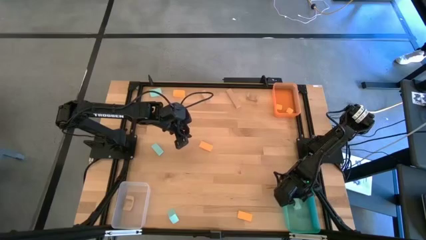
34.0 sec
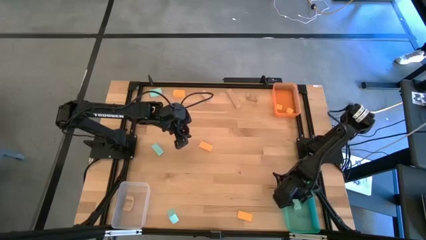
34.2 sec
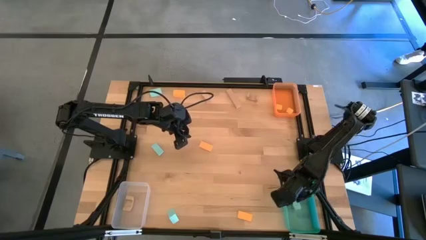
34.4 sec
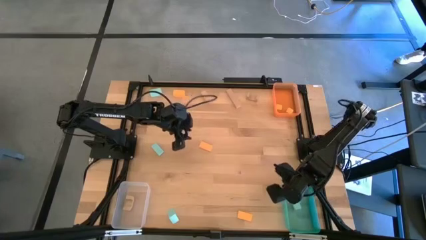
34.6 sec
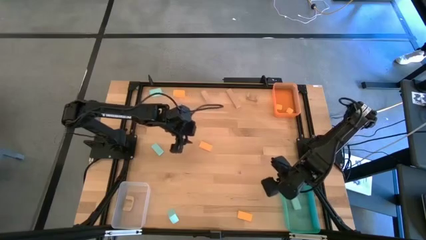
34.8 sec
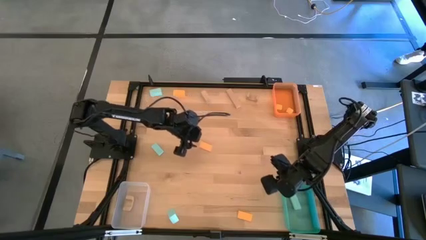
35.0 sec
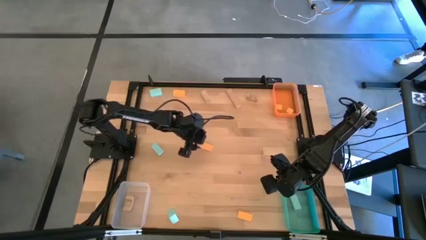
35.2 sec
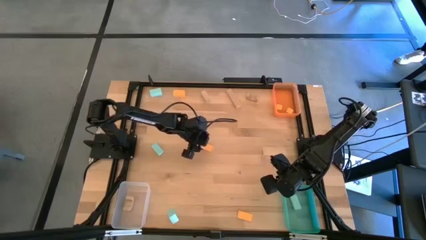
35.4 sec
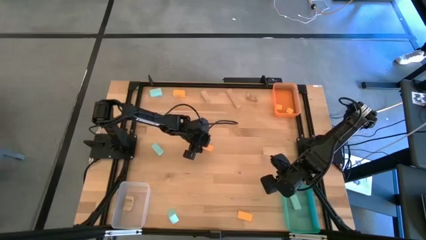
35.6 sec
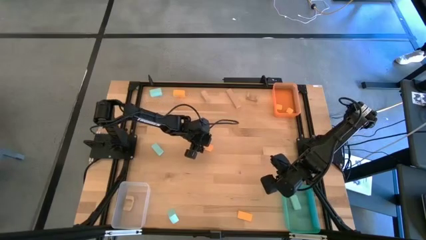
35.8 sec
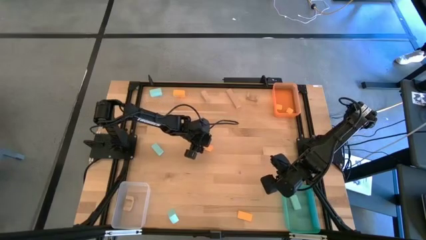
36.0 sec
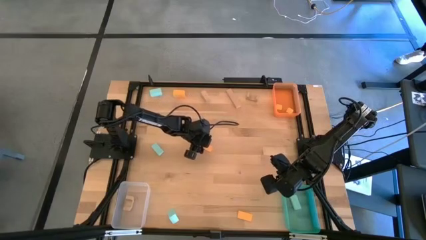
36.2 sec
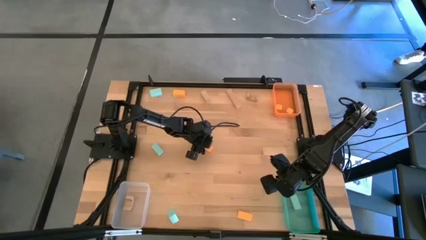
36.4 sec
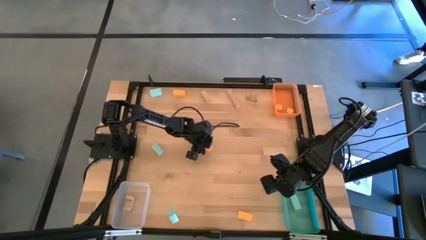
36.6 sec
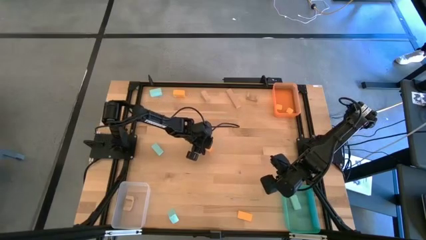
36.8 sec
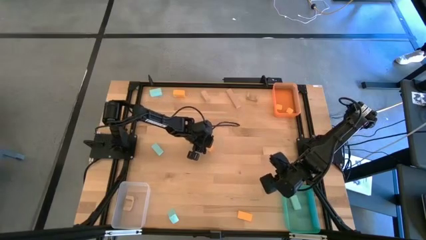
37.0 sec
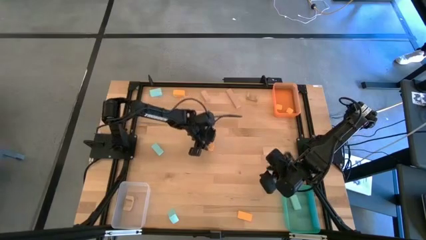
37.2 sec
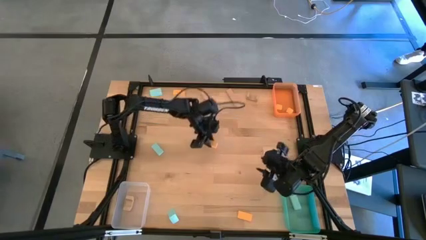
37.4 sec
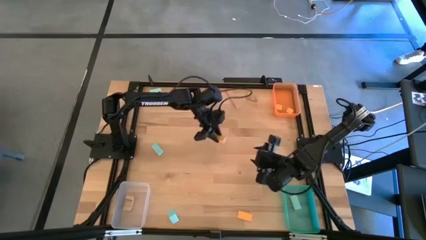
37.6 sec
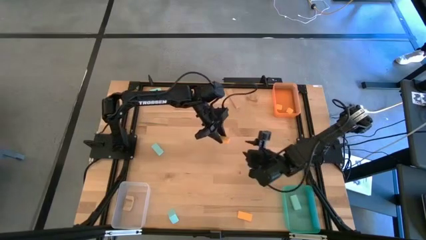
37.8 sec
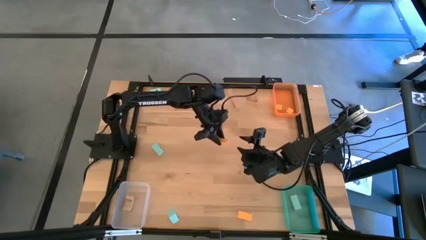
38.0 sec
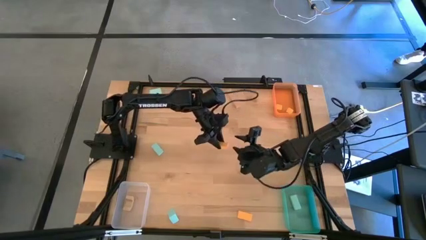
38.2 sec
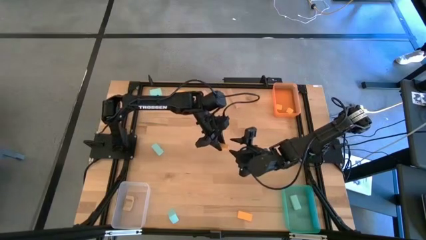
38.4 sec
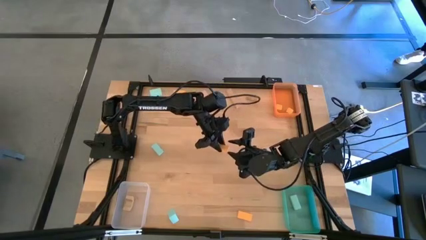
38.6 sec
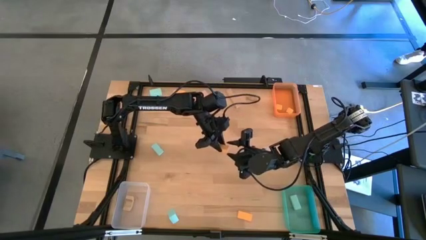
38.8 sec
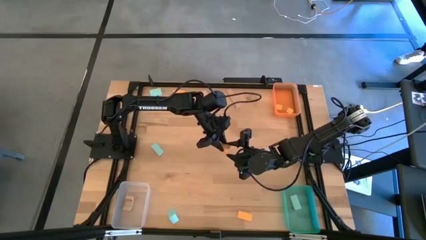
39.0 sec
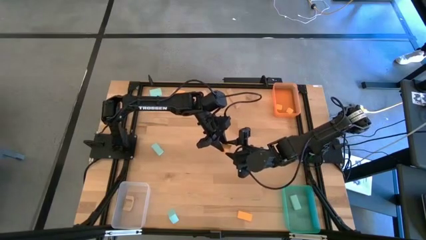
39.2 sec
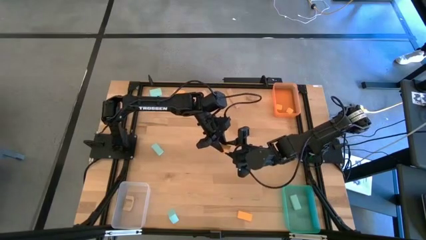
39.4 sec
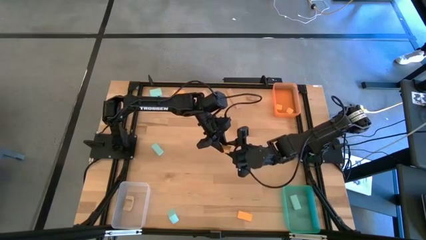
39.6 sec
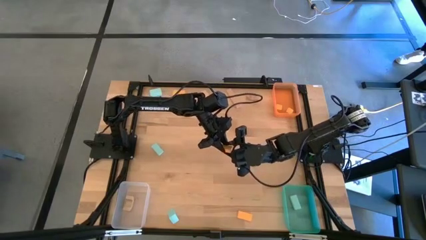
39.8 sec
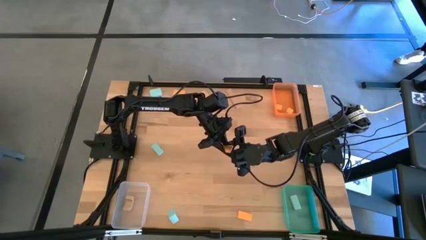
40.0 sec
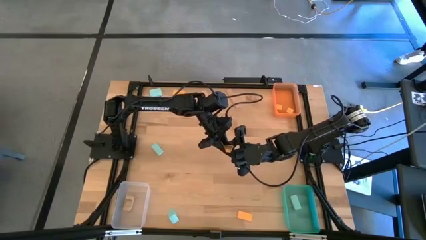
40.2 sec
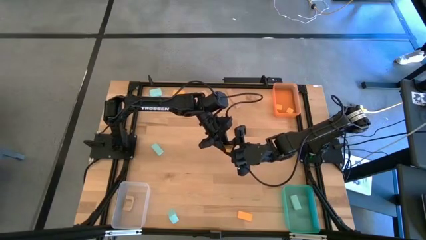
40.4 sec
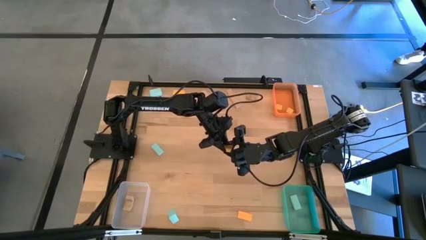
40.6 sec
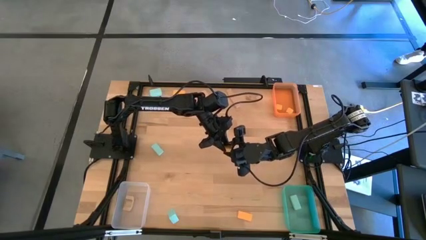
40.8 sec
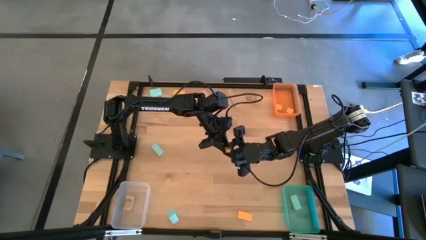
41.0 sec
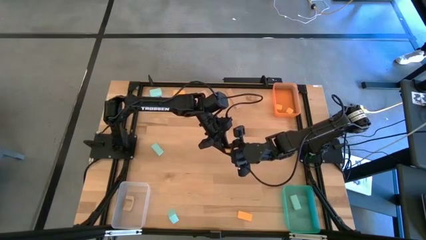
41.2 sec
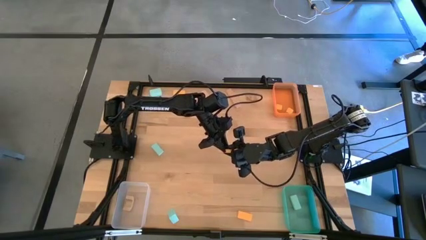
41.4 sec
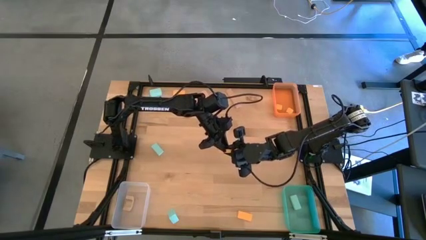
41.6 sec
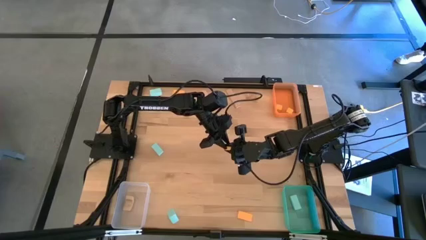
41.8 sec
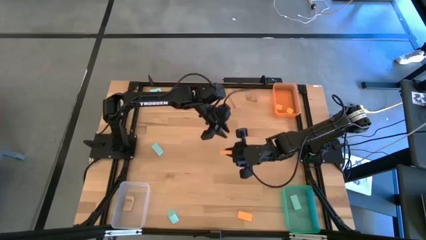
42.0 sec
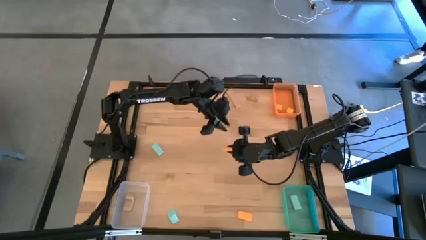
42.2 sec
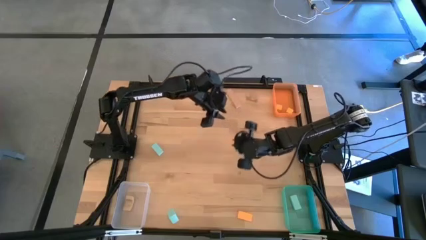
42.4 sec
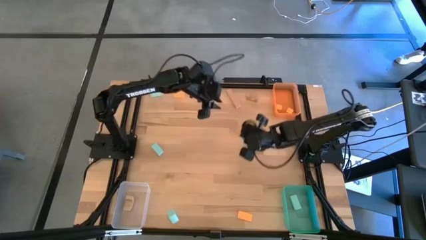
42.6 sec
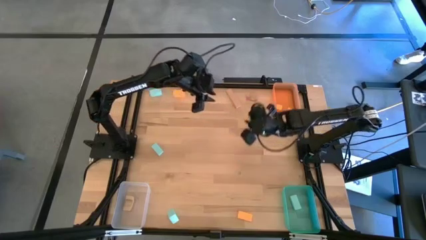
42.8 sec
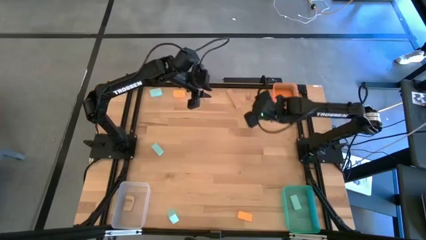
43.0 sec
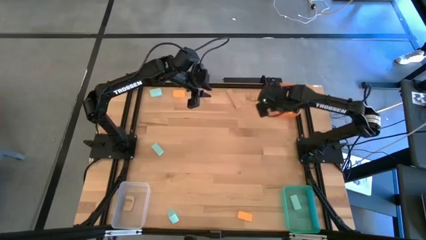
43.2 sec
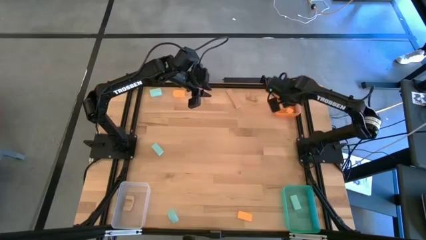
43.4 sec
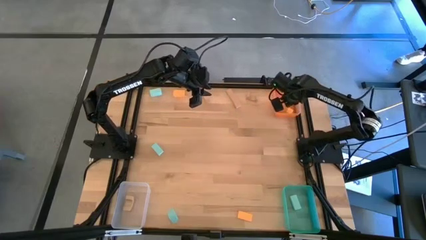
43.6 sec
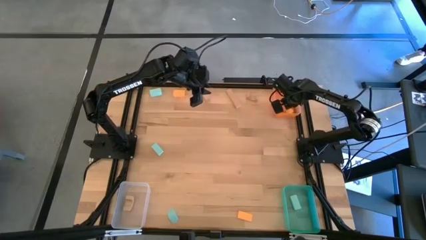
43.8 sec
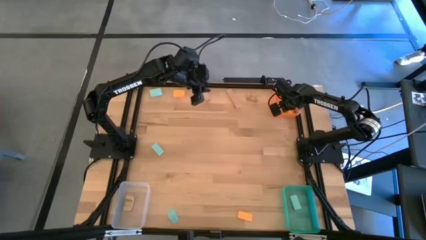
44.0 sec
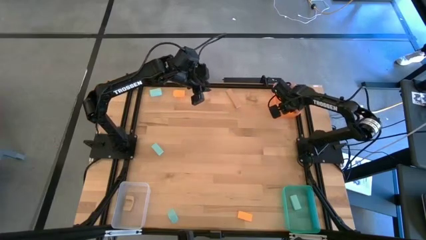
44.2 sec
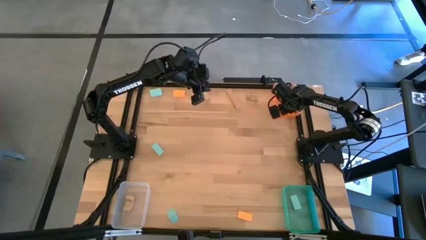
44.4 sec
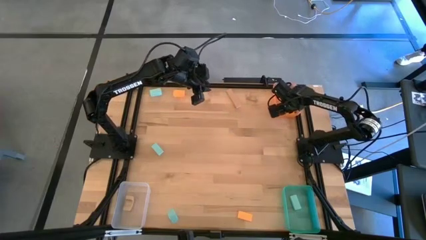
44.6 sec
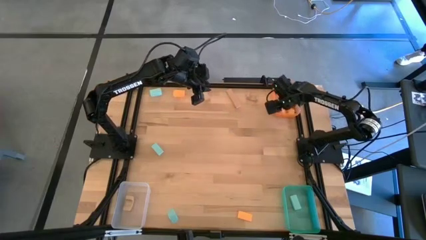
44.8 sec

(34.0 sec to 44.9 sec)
Task: Sort & place blocks by color
Put the orange block into the orange bin

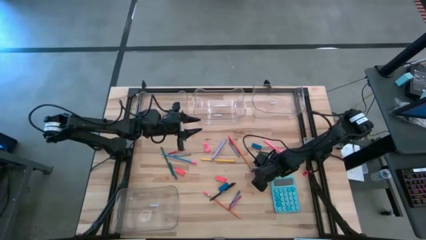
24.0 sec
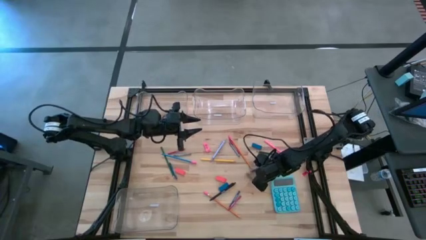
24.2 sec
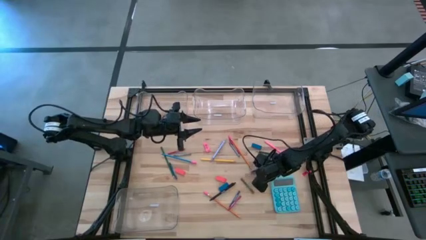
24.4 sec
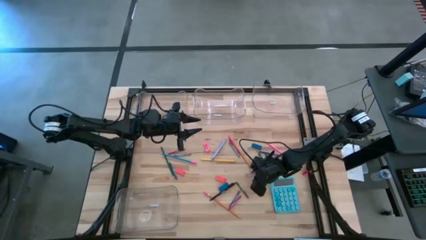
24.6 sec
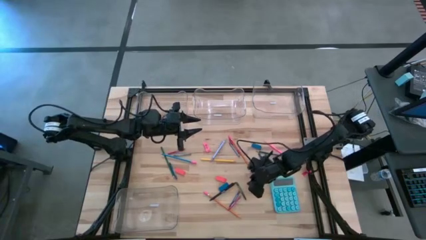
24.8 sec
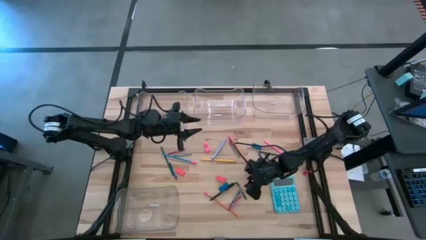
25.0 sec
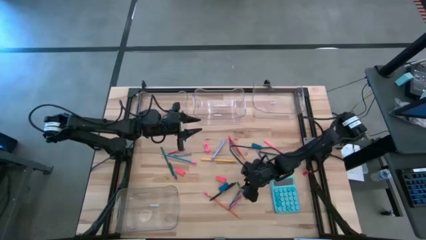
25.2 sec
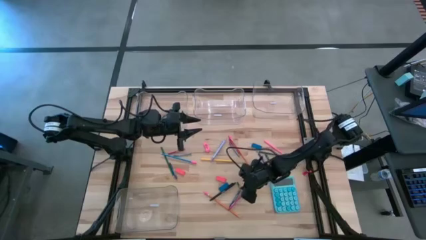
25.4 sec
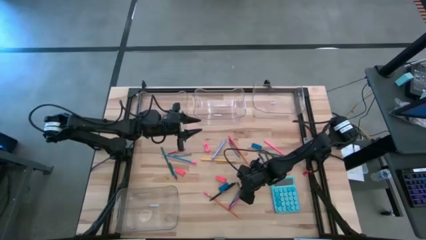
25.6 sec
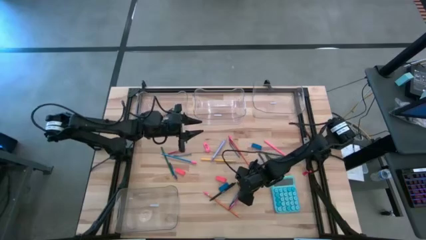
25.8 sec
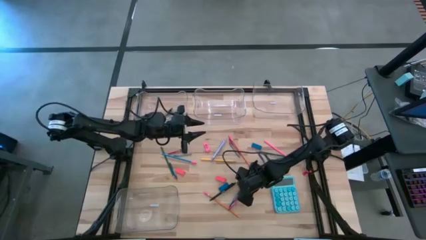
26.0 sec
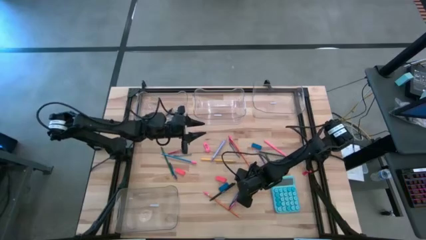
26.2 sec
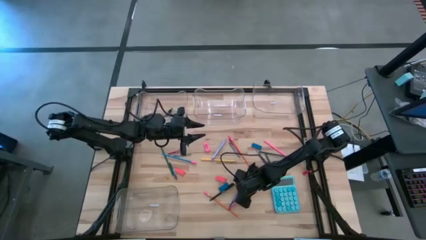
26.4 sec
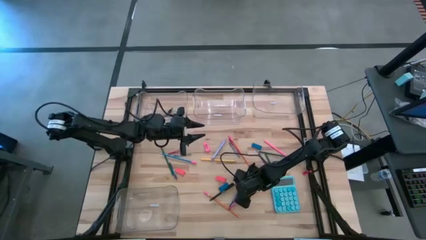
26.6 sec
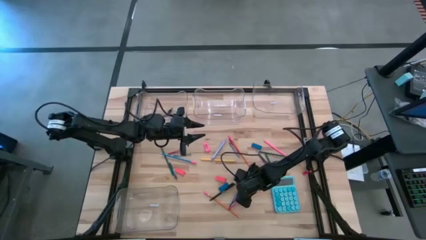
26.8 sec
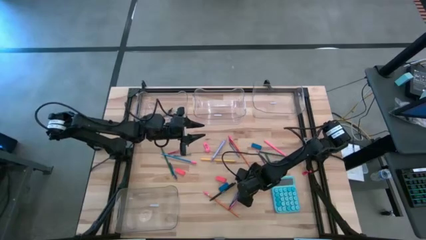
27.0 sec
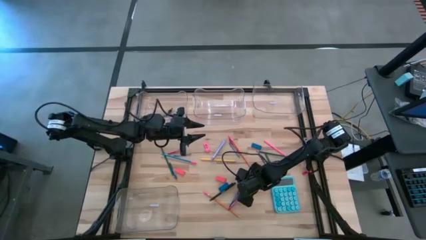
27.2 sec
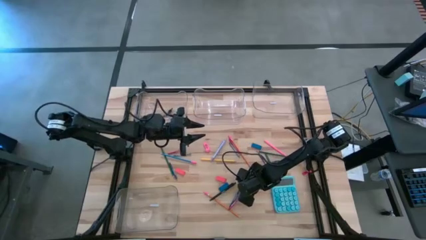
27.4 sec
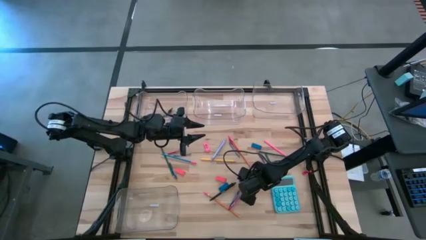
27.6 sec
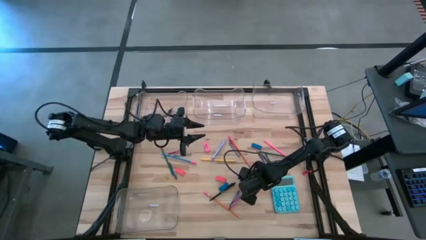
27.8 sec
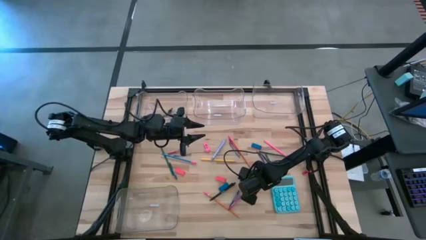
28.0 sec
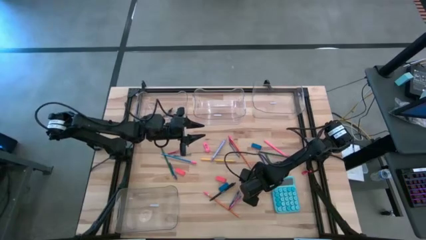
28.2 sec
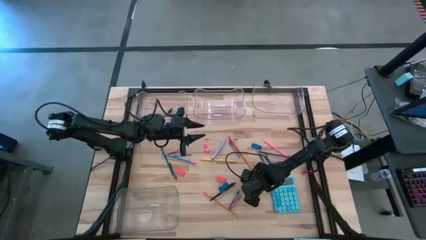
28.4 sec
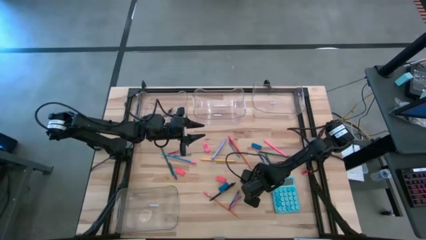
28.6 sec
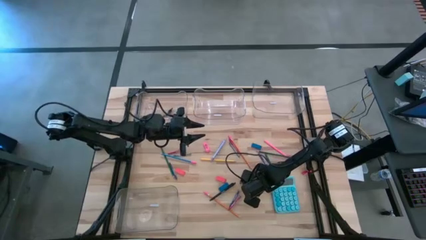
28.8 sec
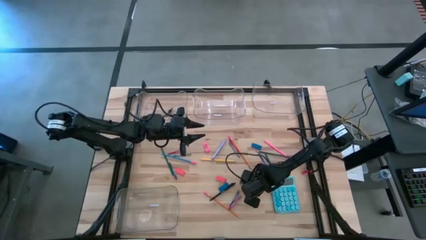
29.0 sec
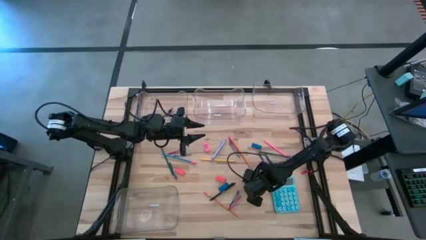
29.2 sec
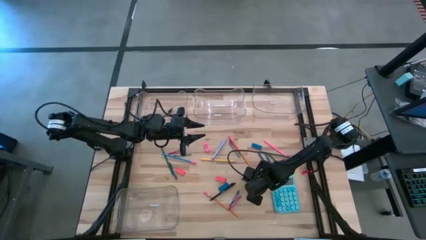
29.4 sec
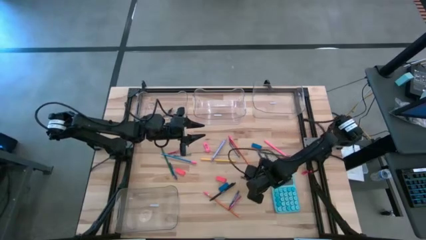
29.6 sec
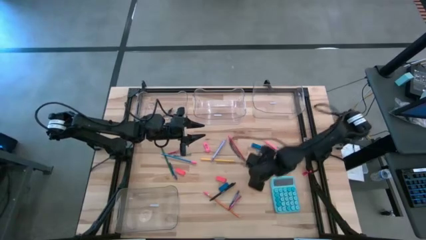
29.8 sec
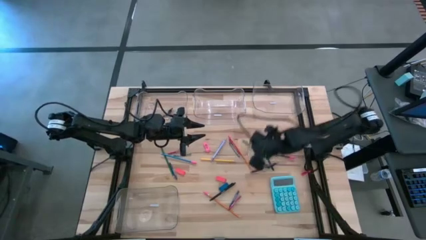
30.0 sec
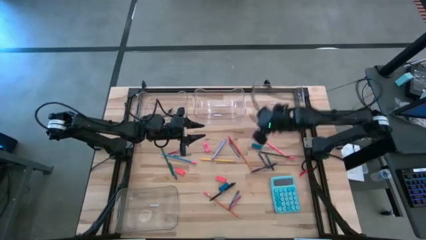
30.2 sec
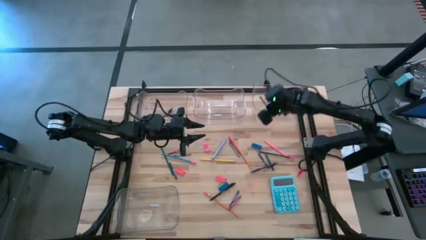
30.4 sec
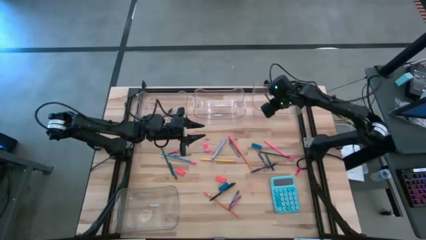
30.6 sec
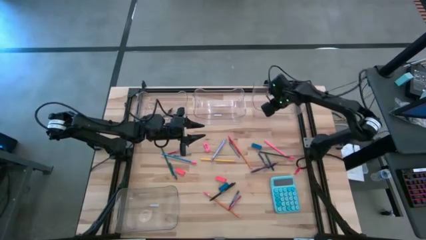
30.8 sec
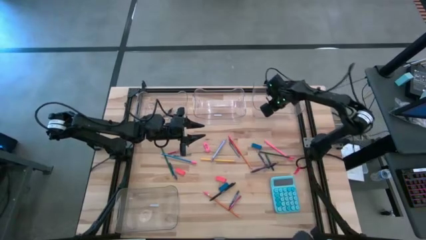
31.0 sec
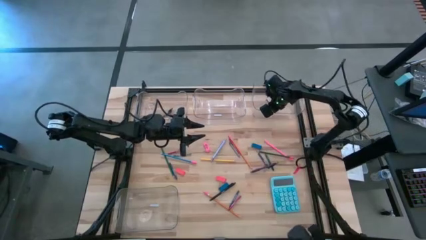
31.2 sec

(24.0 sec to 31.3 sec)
Task: Sort crayons/erasers/pens/pencils in bins
Put the green crayon into the top right transparent bin
